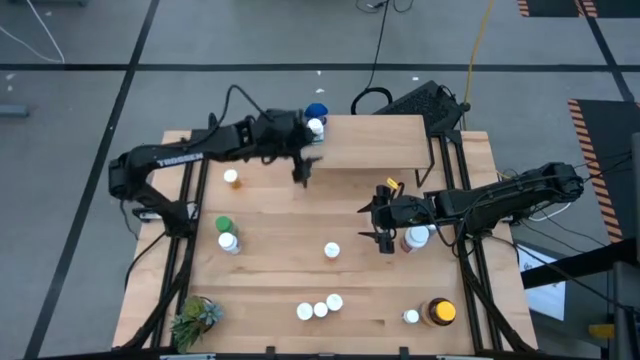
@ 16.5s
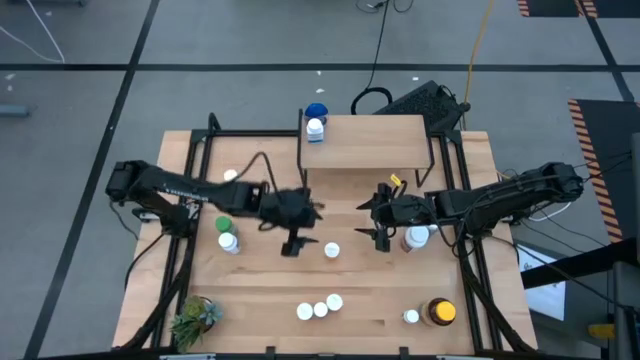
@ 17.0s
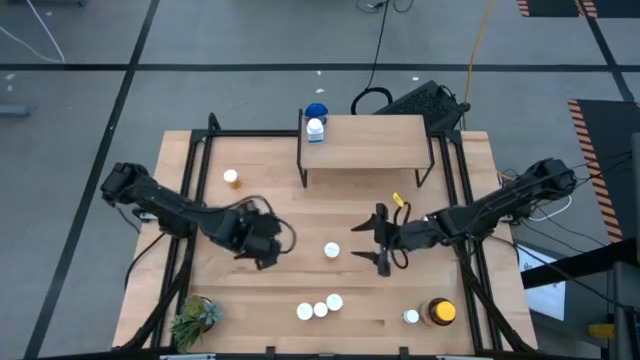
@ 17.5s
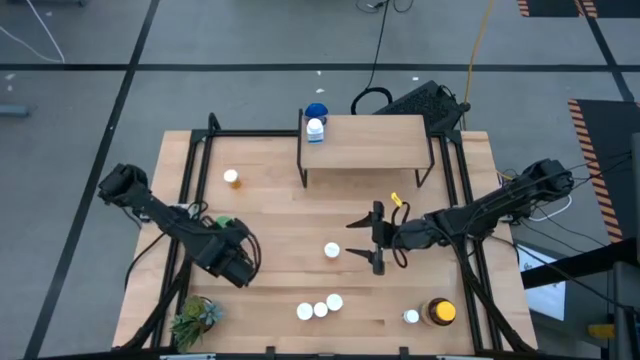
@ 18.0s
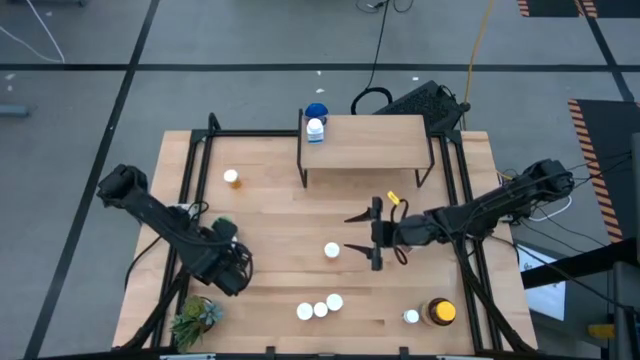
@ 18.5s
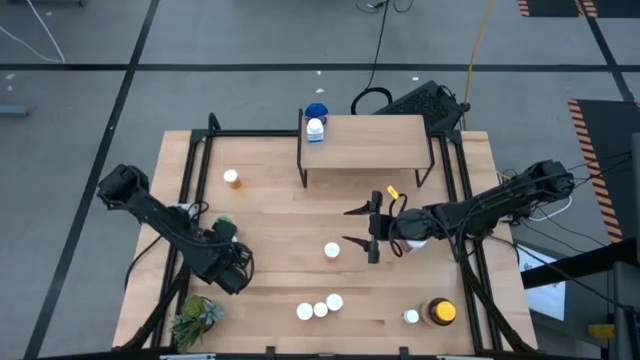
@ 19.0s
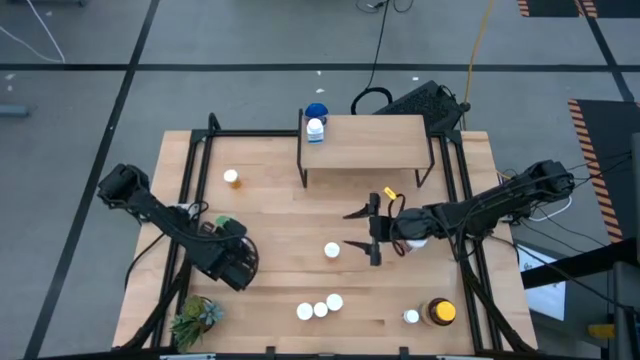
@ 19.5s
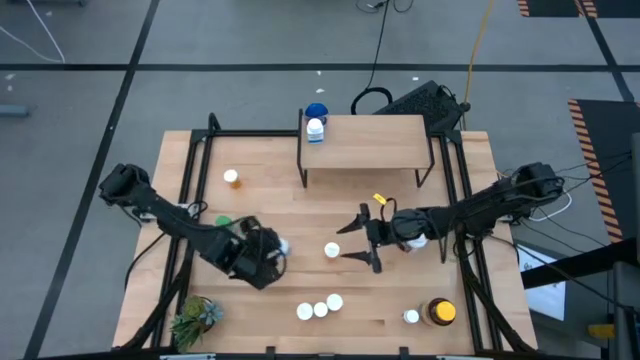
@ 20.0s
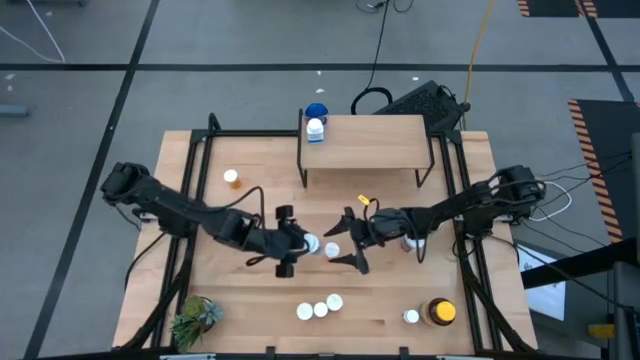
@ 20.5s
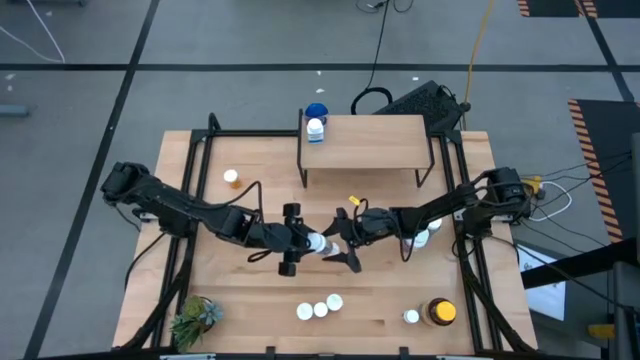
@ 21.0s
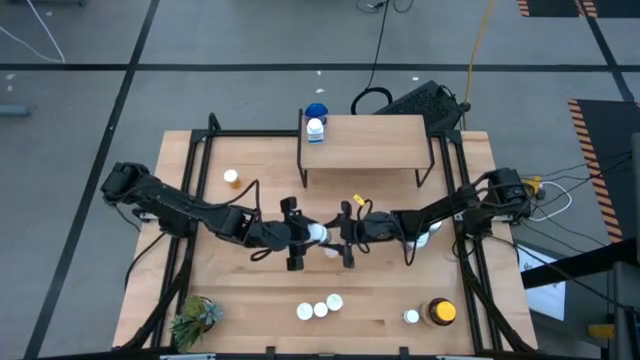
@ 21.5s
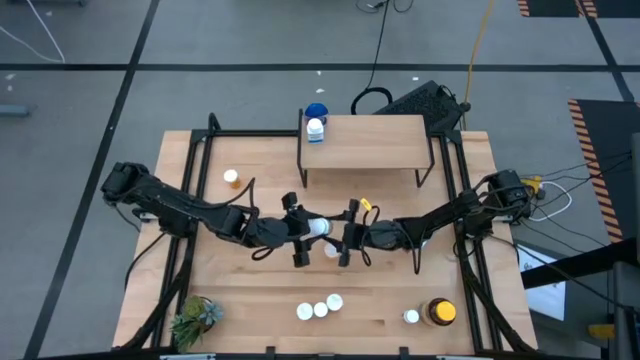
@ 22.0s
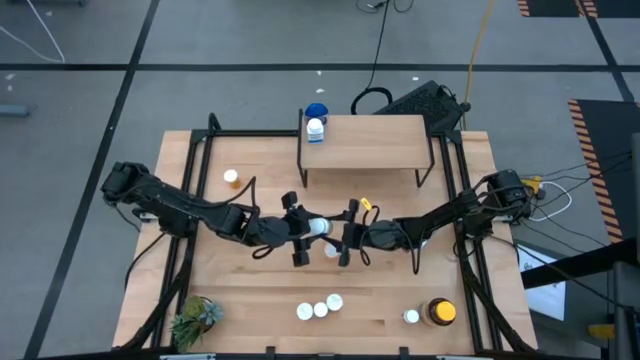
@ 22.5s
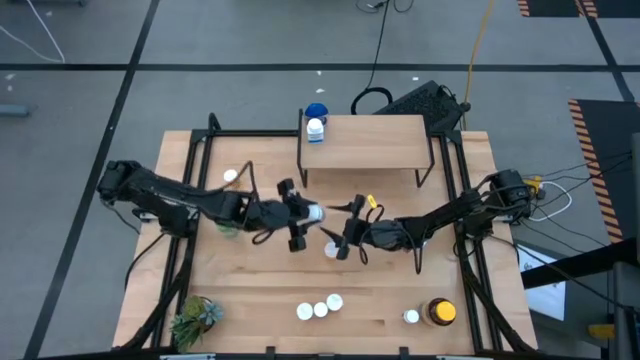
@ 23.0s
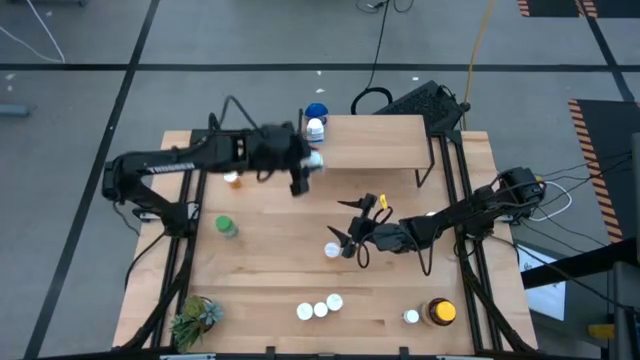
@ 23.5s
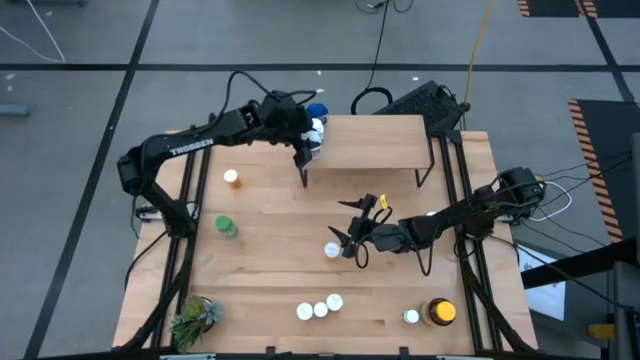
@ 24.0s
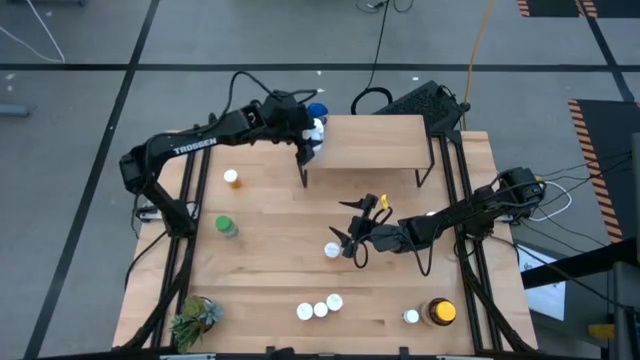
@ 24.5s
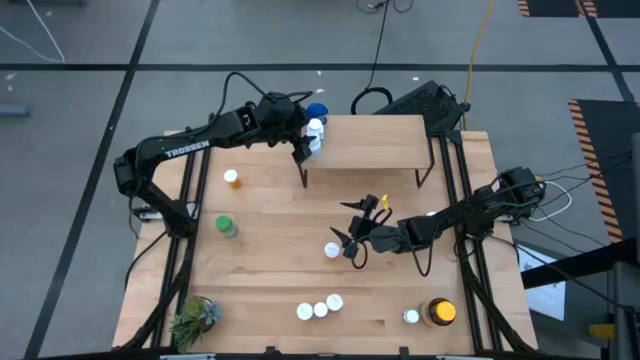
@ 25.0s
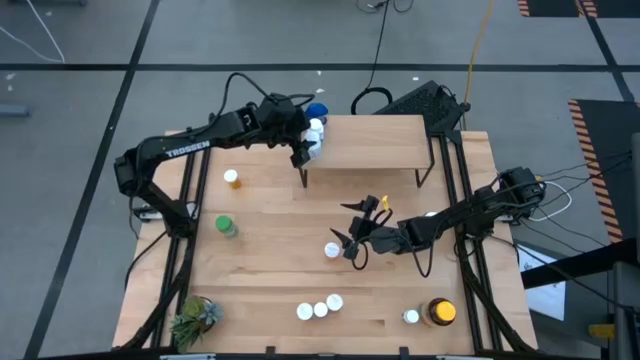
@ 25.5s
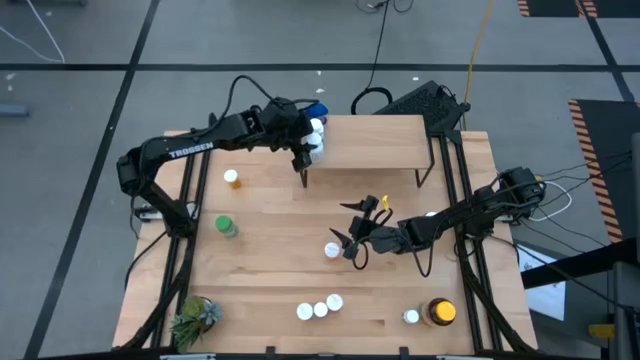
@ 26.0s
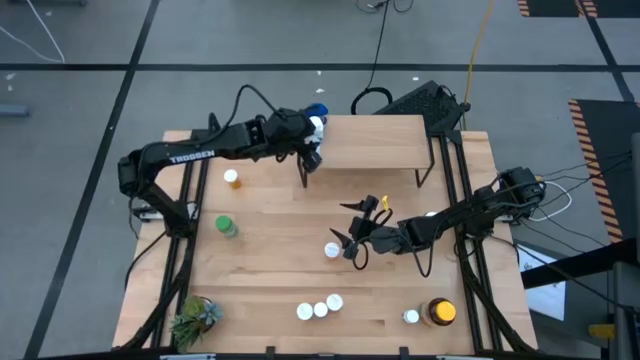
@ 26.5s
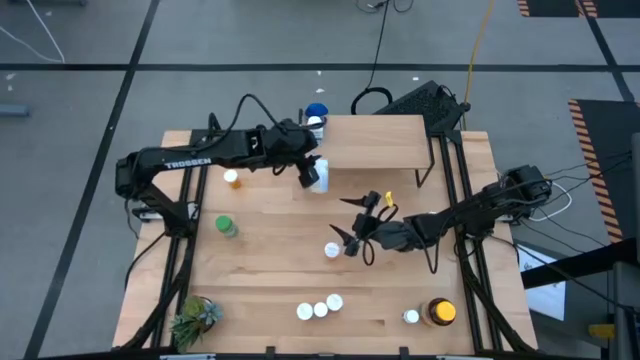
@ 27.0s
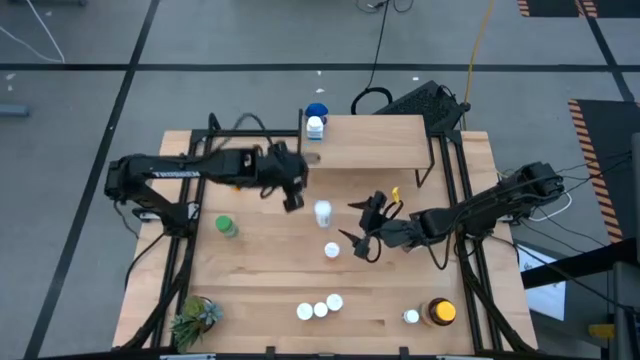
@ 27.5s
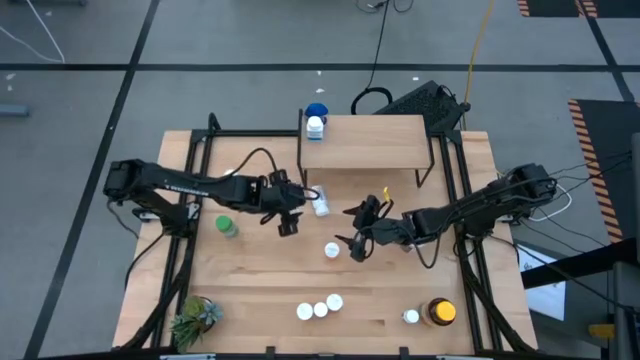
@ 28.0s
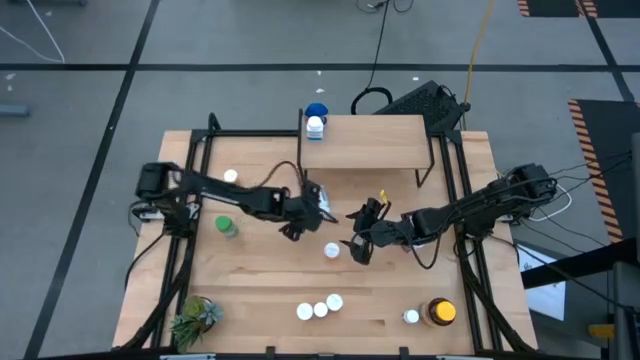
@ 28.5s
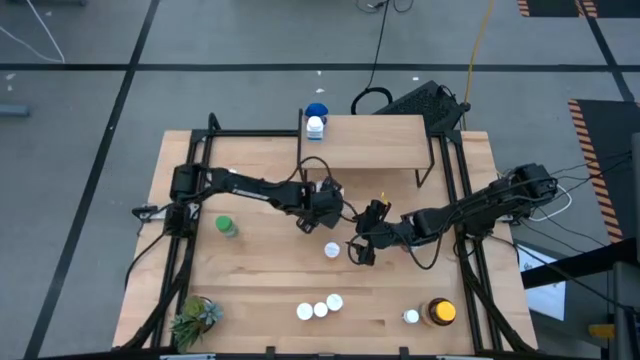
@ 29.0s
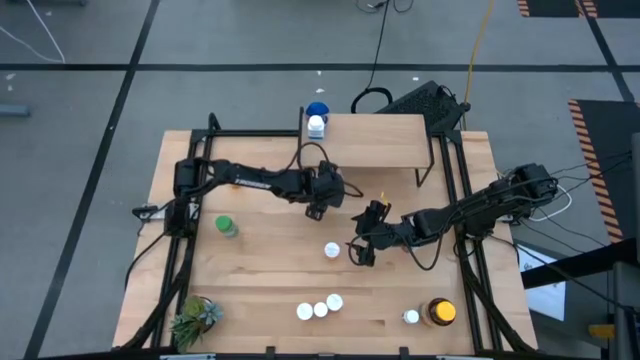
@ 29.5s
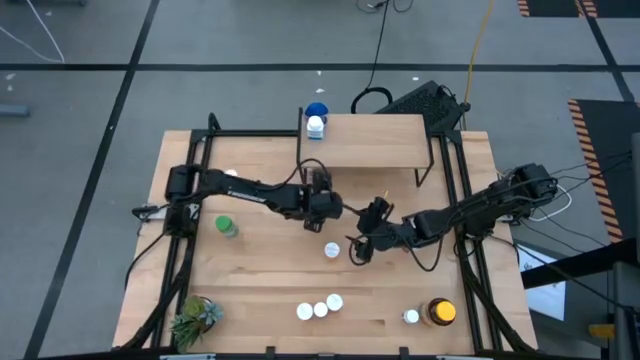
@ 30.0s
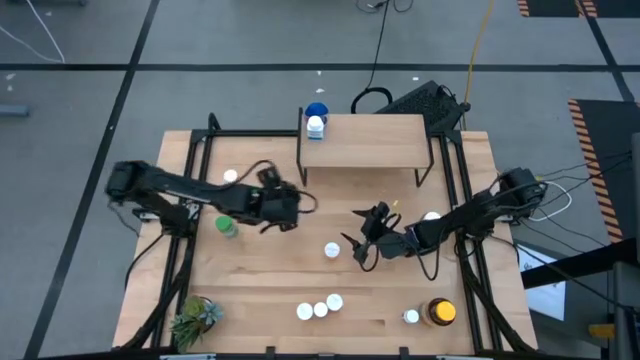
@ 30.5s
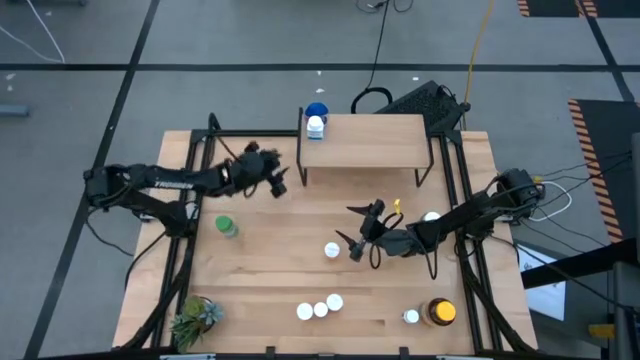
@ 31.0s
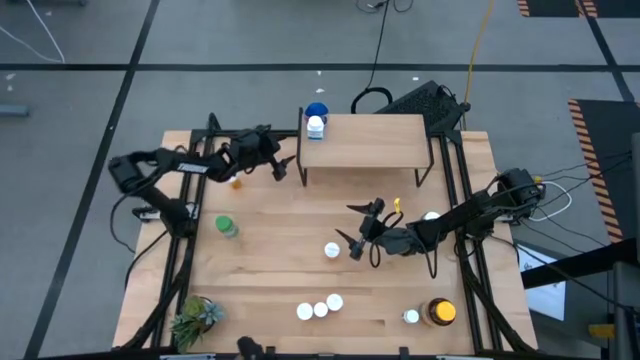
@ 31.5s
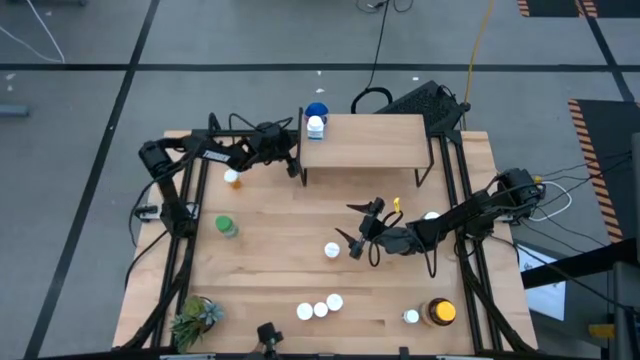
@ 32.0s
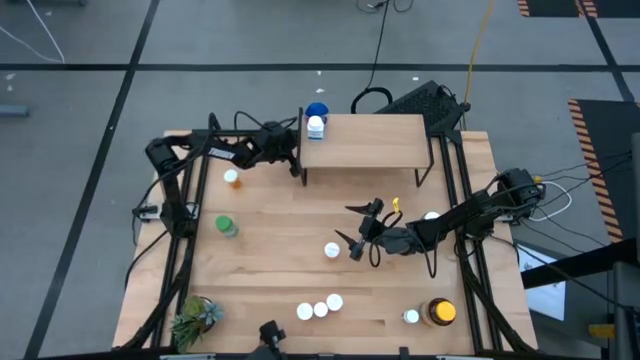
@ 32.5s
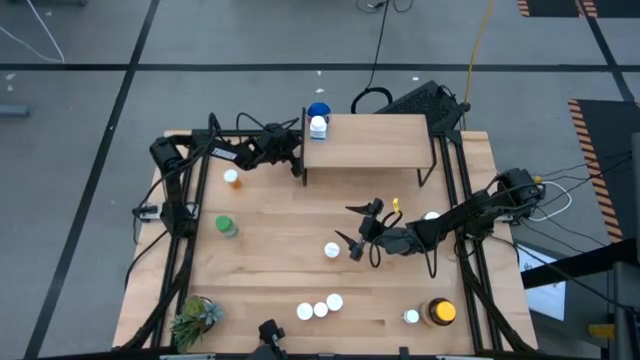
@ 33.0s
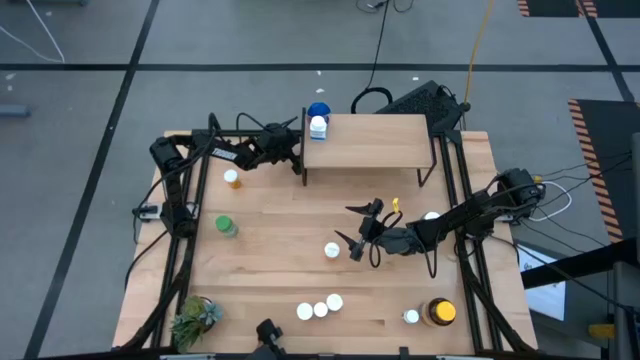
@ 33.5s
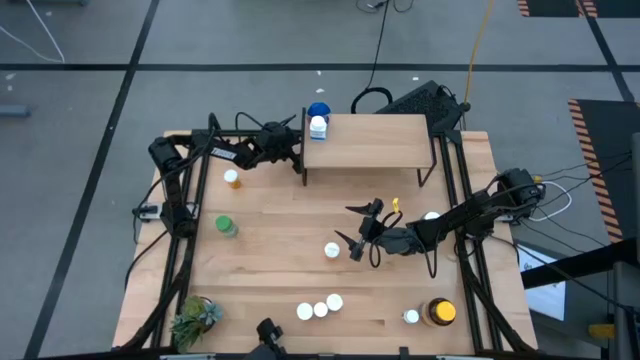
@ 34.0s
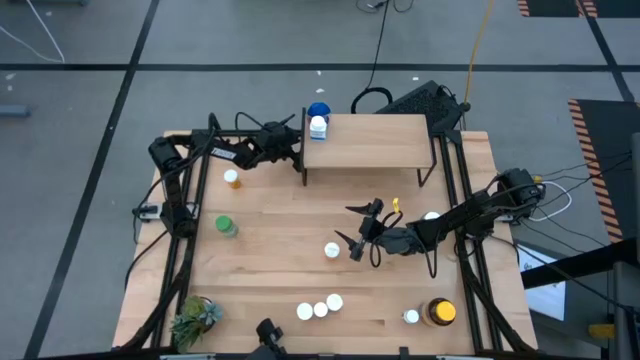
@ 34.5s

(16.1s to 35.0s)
Task: Pick and place medicine bottles onto shelf by color
Put the white bottle on the shelf

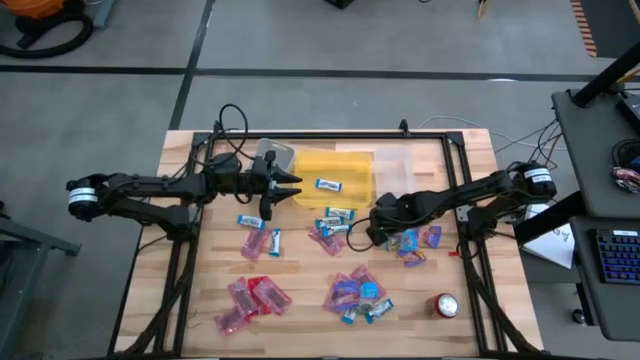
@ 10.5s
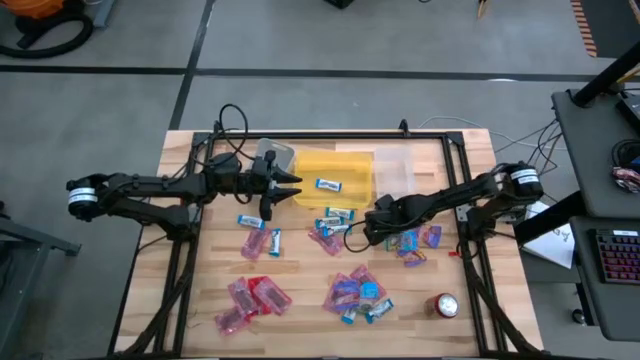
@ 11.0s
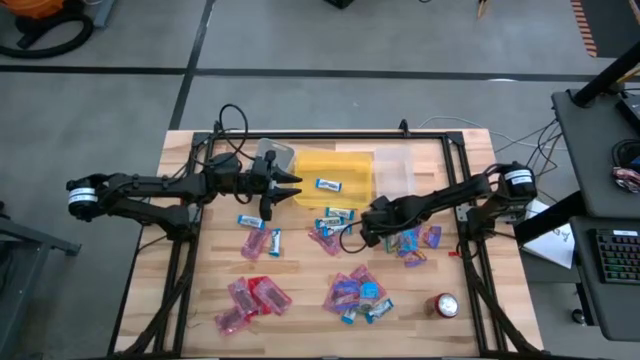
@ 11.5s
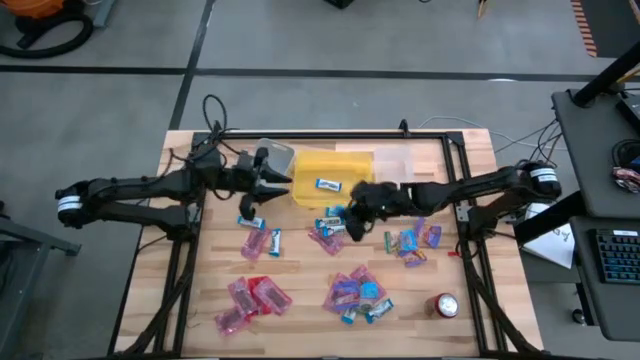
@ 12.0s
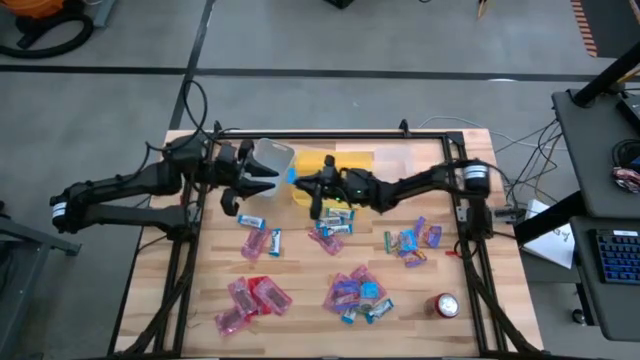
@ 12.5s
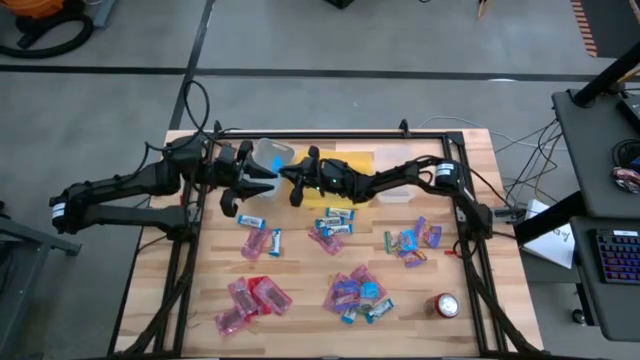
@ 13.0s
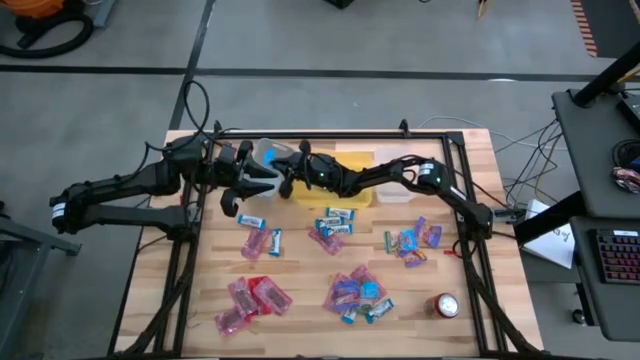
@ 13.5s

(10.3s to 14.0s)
Task: Sort candy
Put the blue candy into the gray bin
